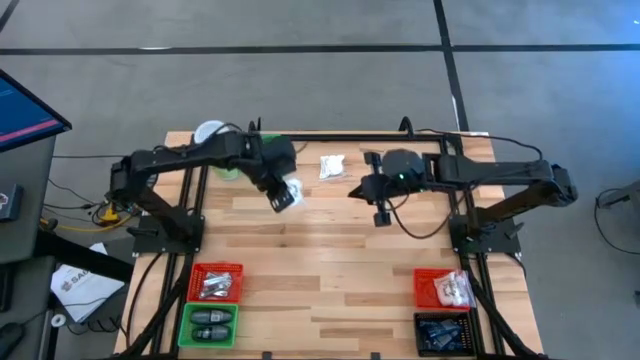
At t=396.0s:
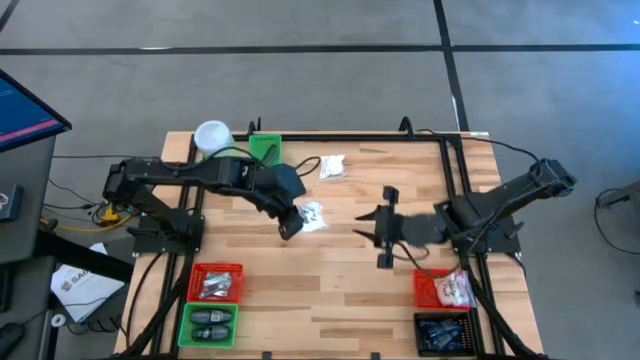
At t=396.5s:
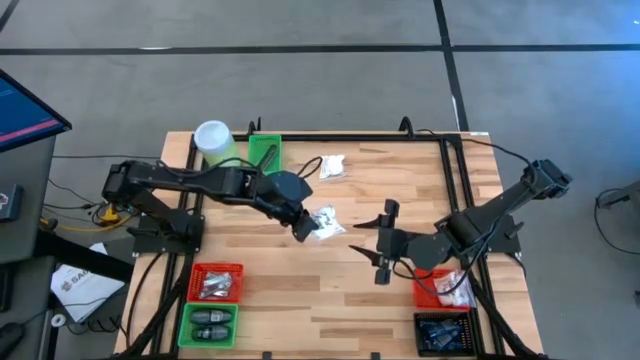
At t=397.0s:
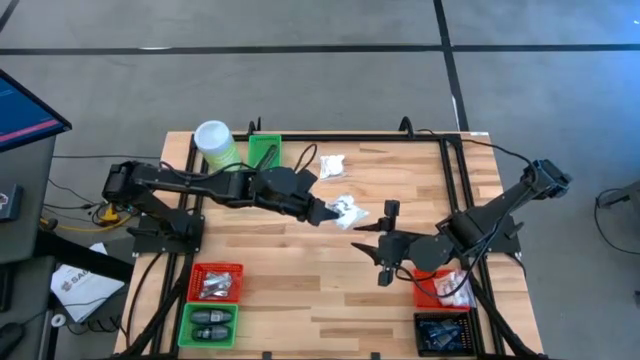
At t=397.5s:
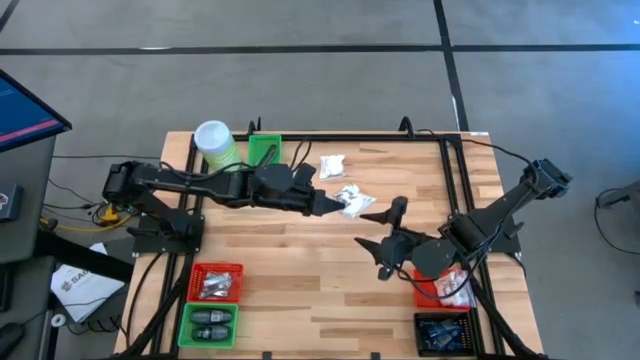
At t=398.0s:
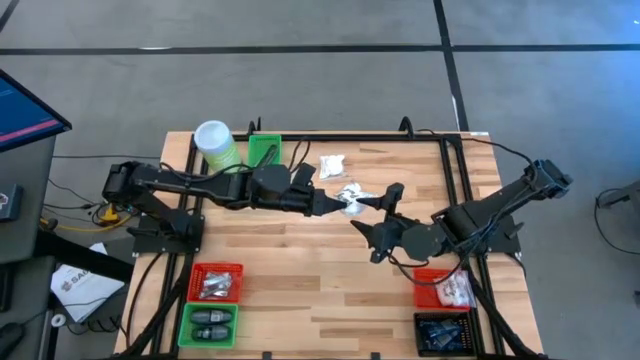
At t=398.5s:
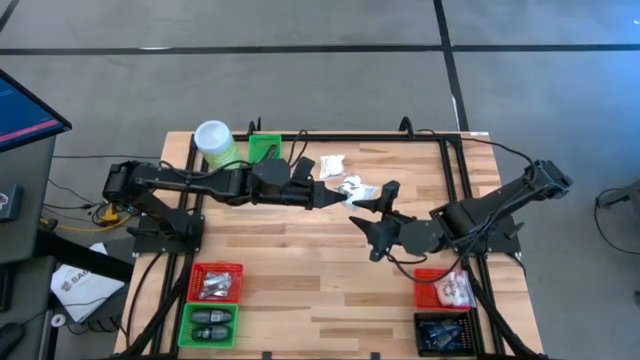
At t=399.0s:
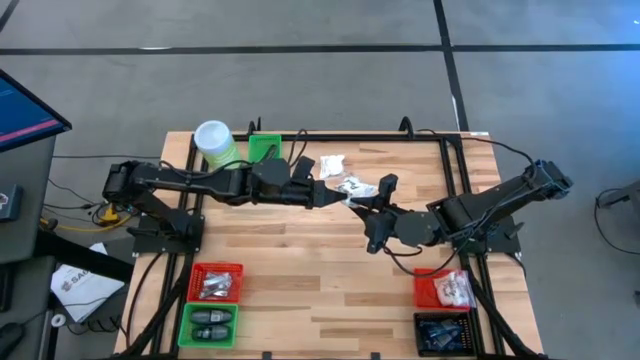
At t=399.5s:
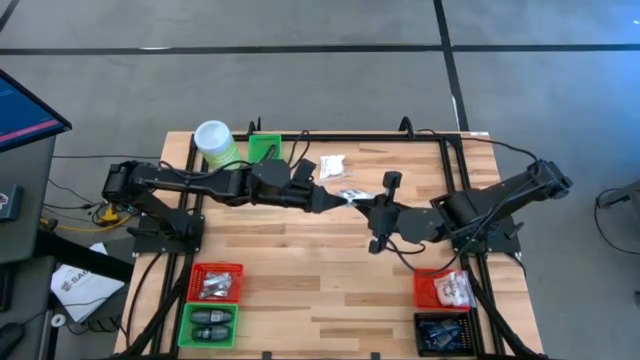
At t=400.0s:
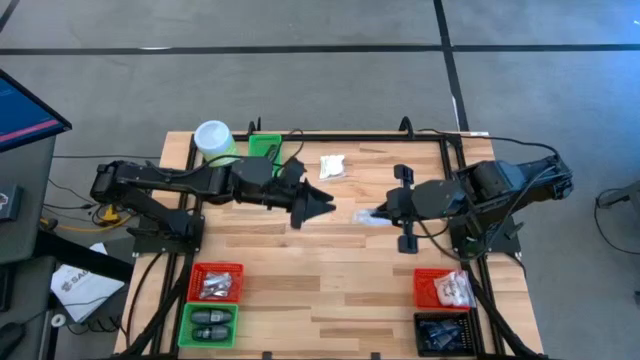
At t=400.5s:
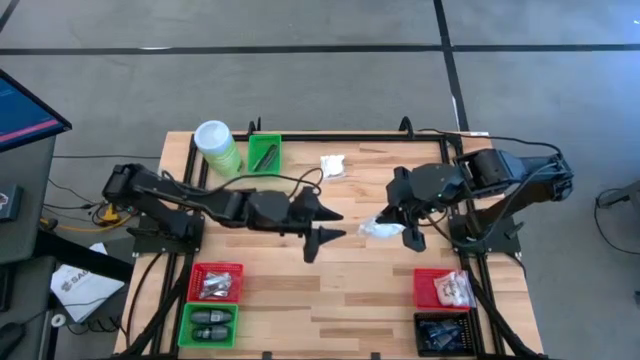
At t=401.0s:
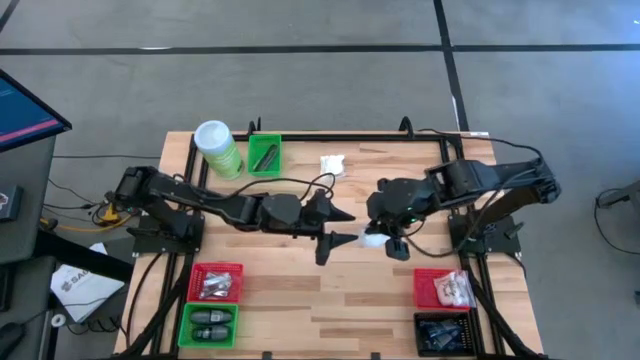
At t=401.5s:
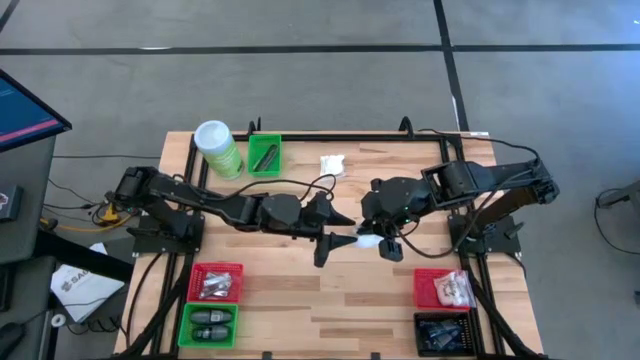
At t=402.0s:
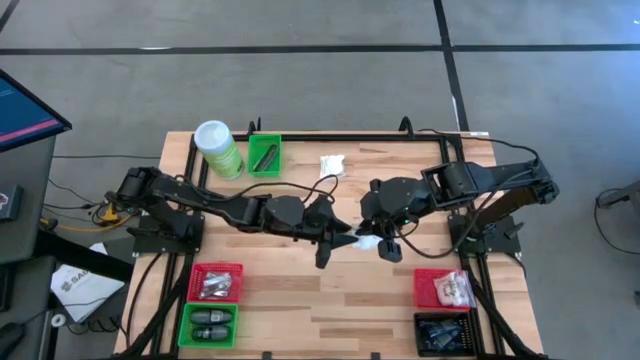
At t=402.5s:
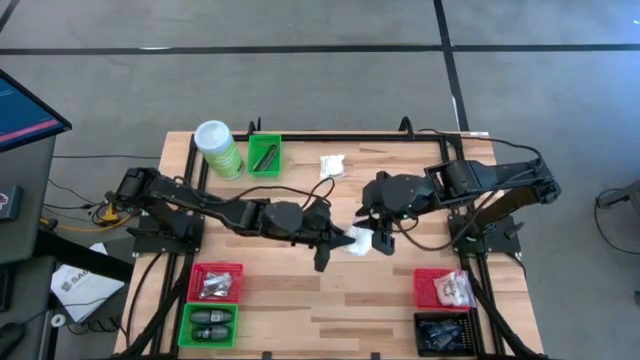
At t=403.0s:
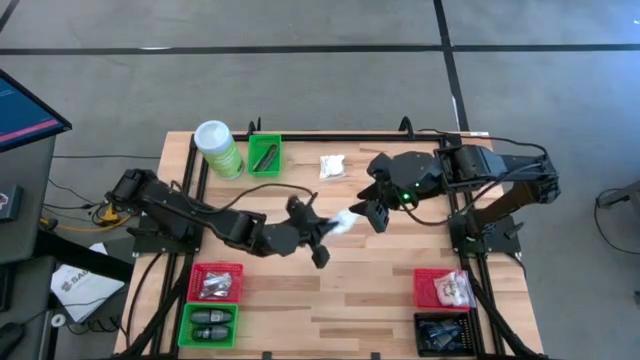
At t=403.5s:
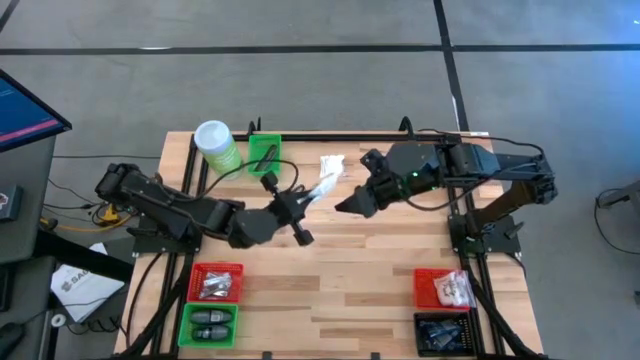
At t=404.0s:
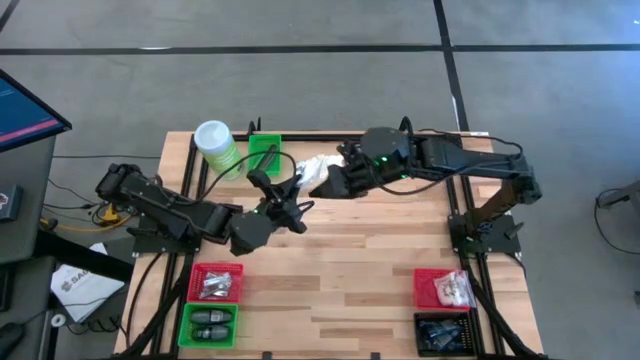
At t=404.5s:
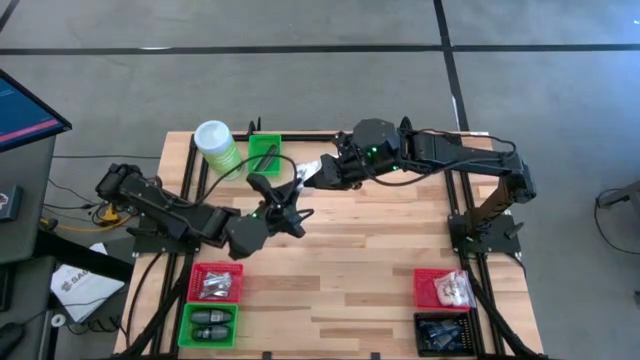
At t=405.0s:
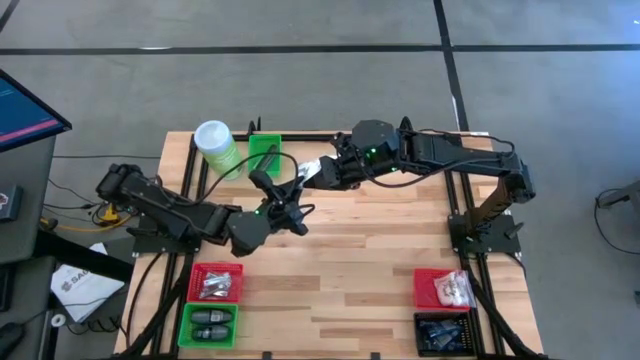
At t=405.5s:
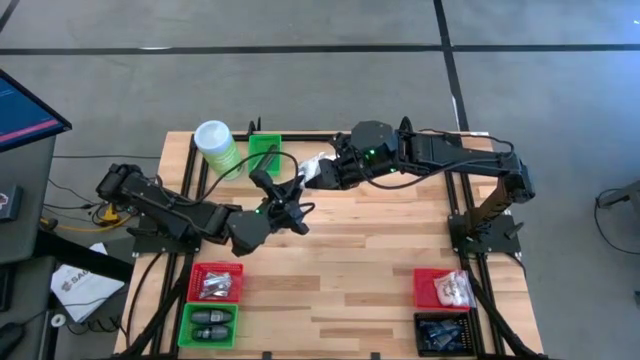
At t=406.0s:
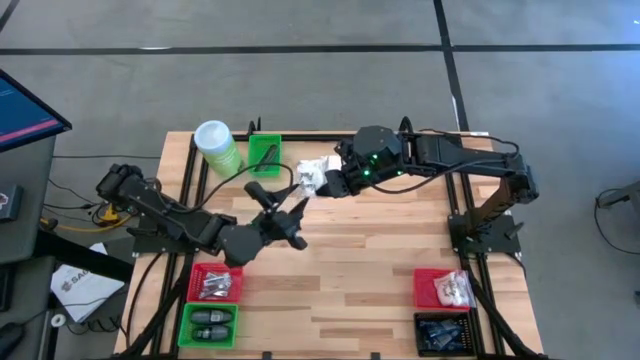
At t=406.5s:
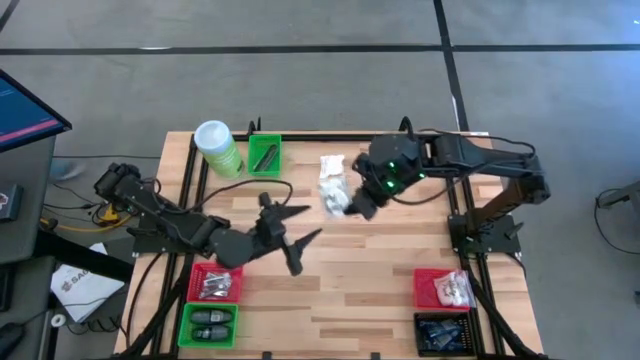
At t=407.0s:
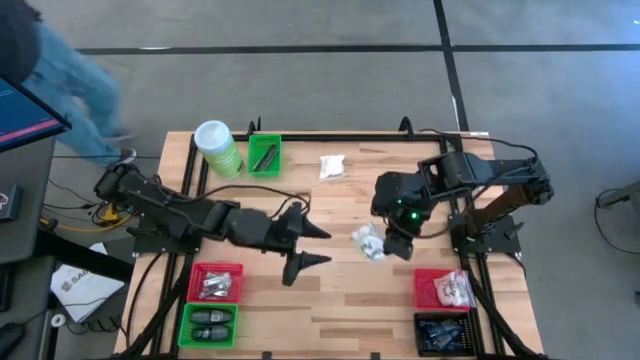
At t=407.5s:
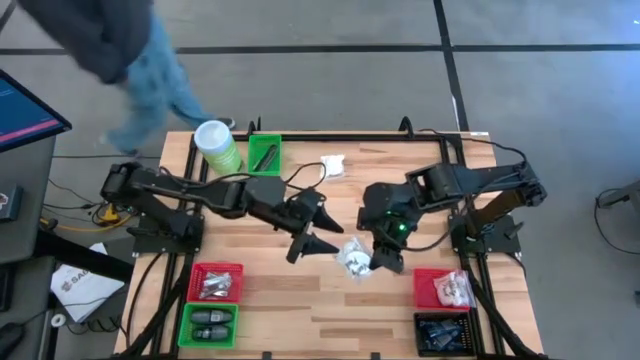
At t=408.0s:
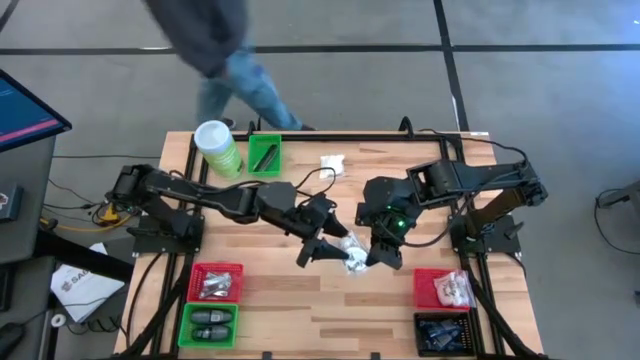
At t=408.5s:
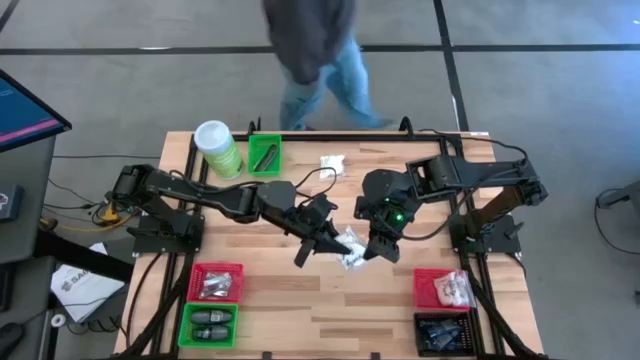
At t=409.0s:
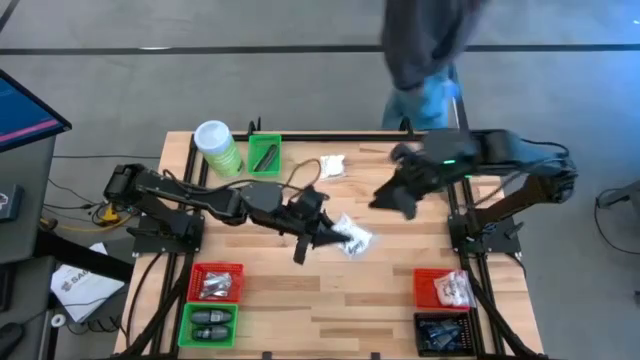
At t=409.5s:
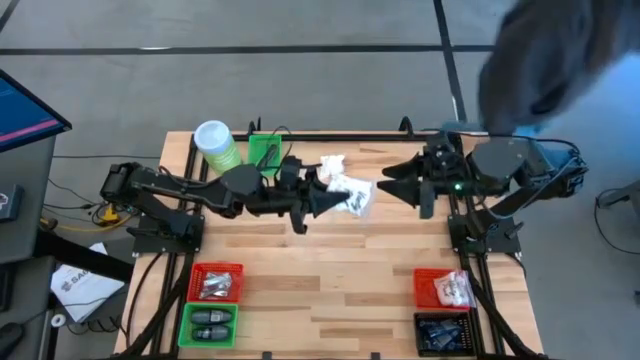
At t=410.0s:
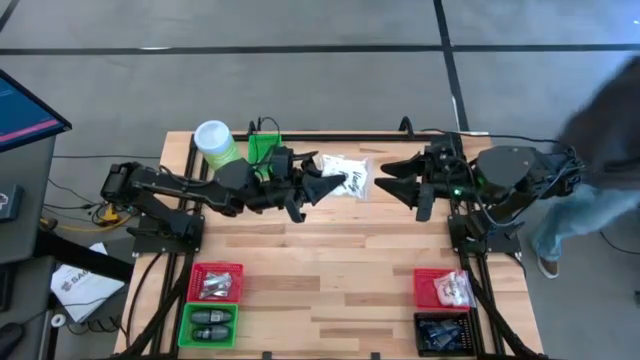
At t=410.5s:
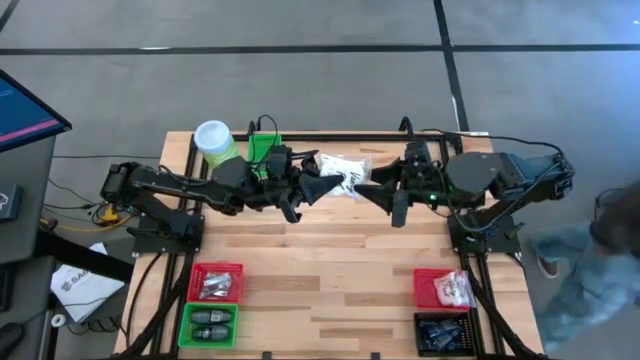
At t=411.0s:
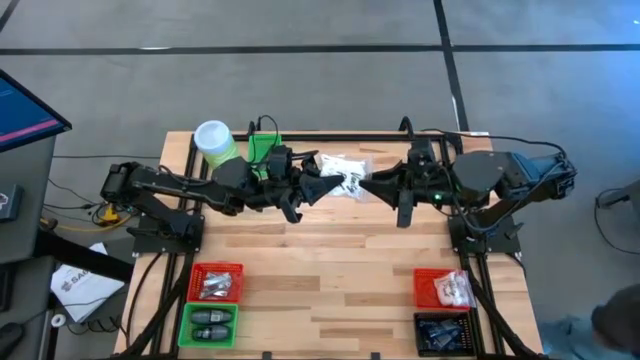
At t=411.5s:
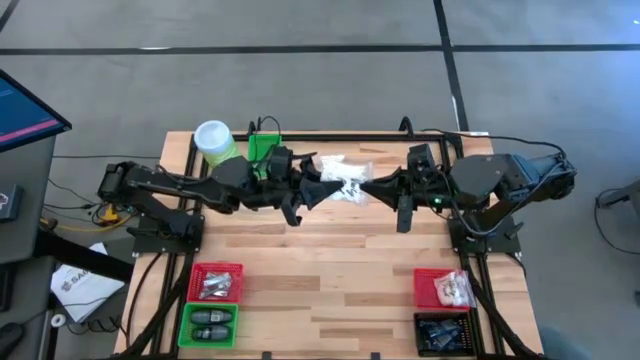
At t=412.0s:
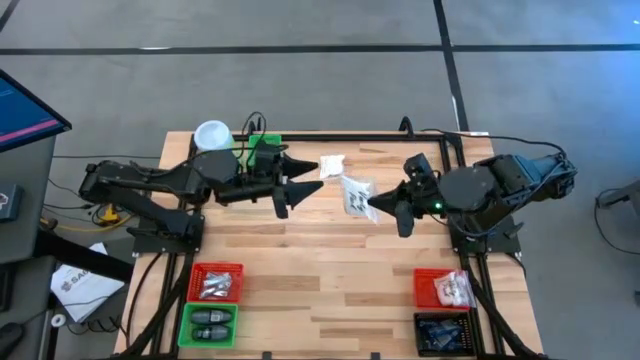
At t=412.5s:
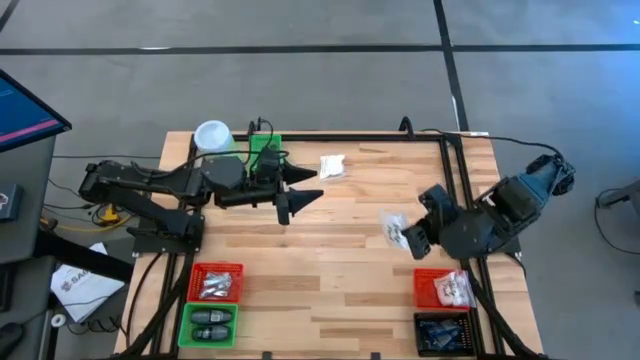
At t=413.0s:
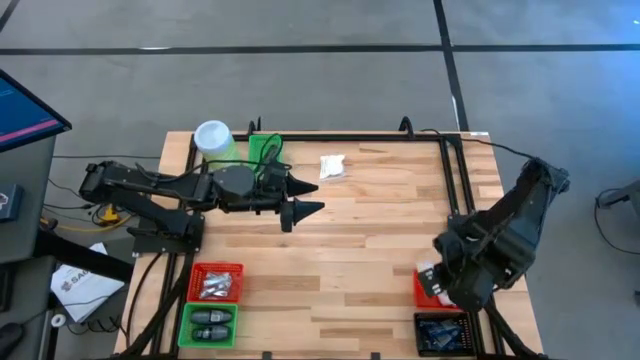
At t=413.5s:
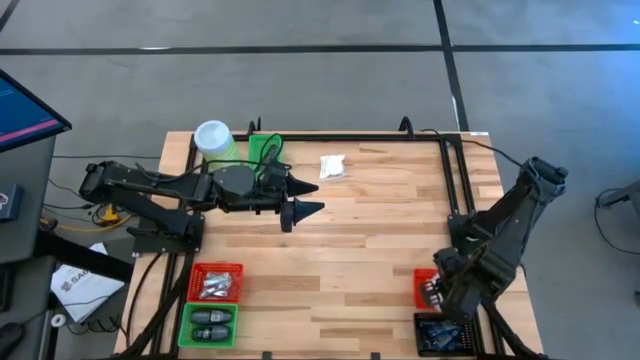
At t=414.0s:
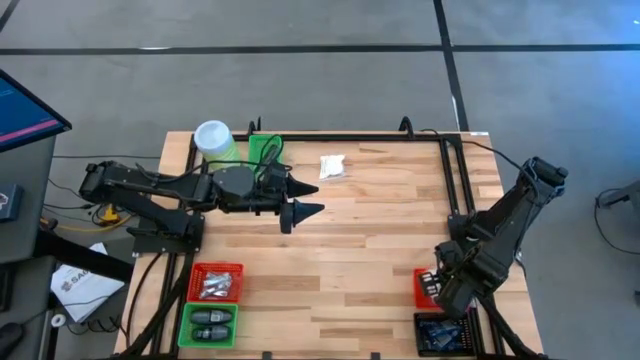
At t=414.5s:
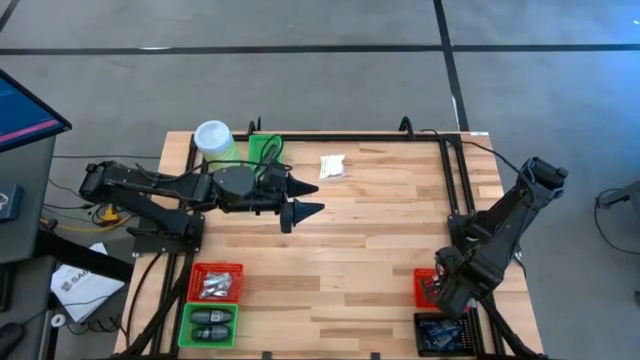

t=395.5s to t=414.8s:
Task: Pick & Place Travel size toiletries
Put the cotton pack into the right red bin

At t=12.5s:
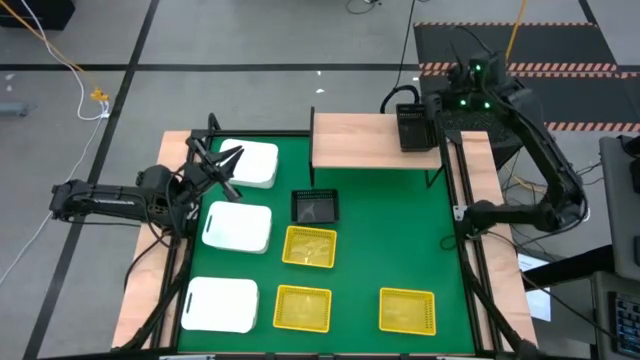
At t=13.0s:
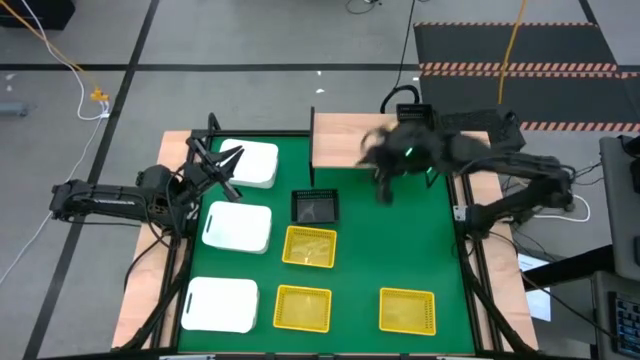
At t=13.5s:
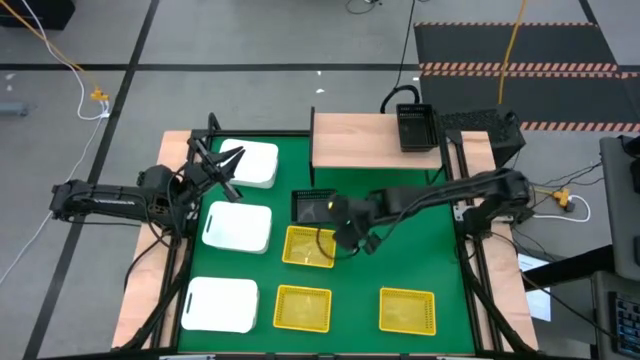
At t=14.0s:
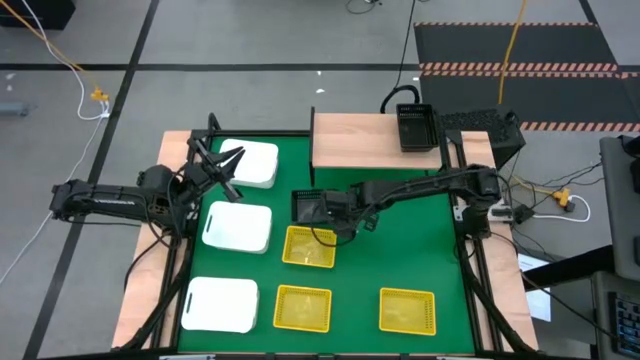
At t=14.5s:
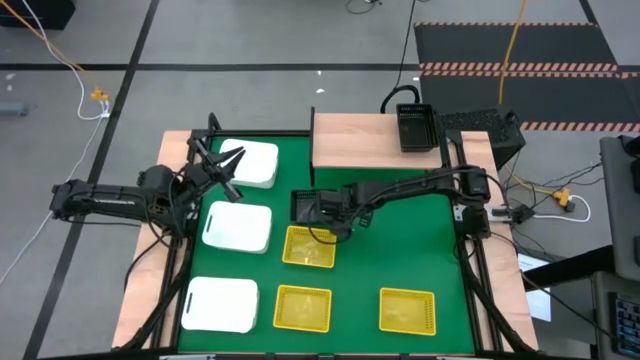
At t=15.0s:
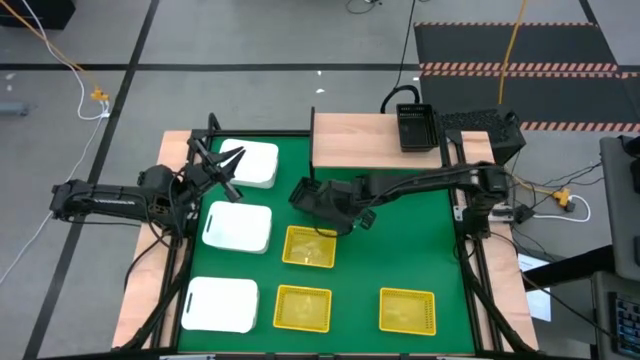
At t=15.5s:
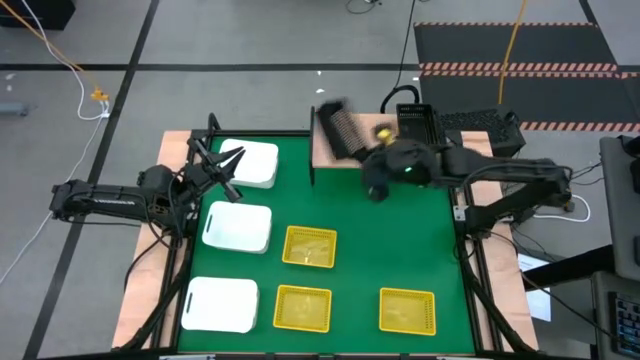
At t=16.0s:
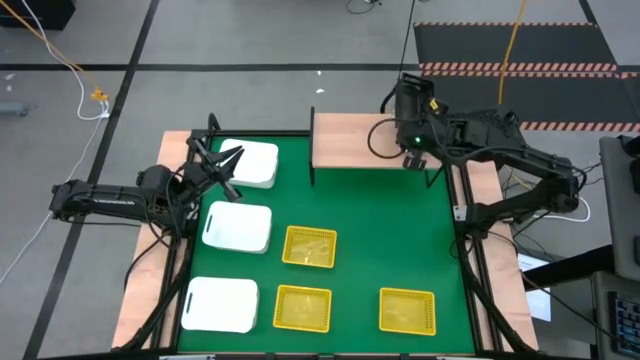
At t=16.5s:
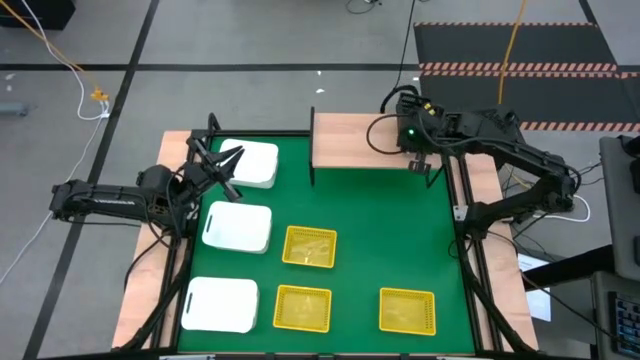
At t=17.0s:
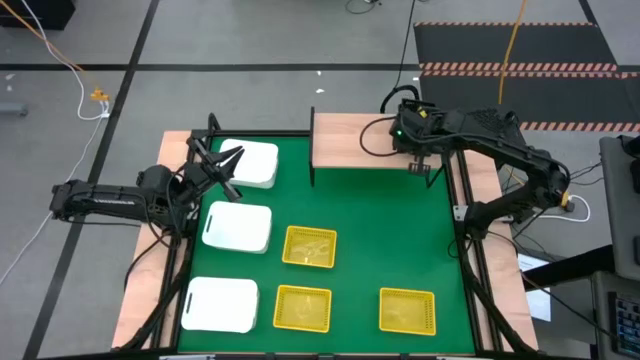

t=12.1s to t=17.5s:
Task: Stack baskets on shelf by color
Stack the black bin into the stacked black bins on the shelf
